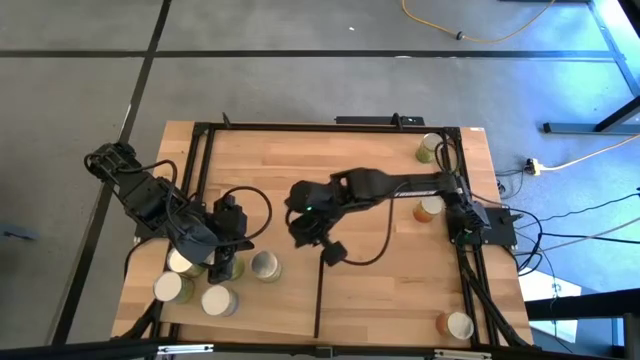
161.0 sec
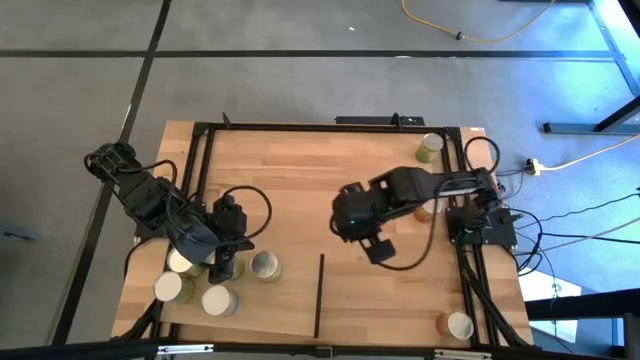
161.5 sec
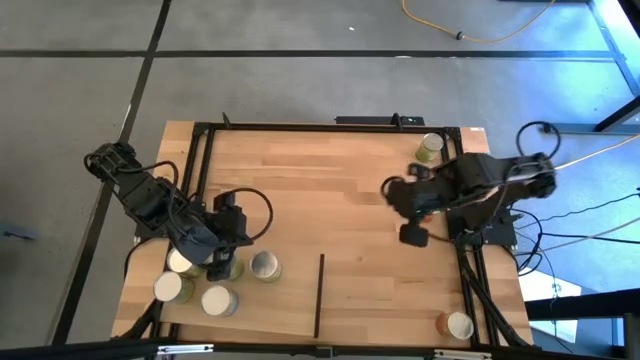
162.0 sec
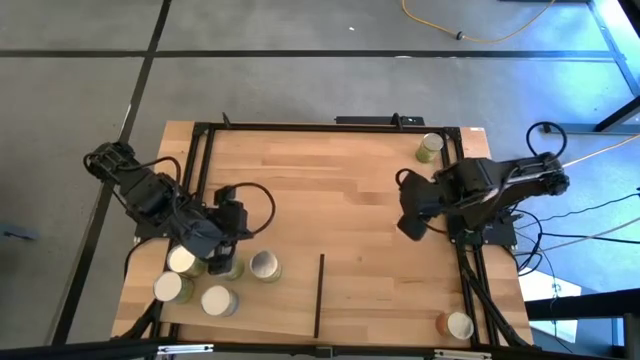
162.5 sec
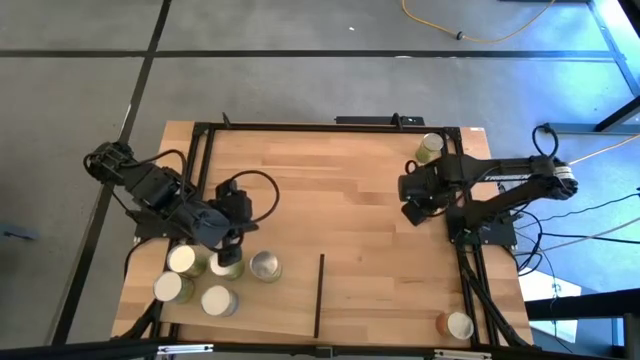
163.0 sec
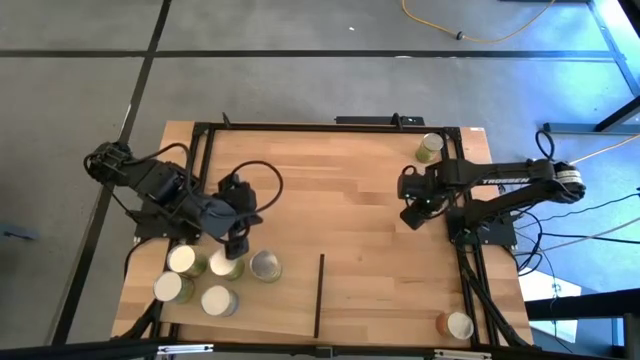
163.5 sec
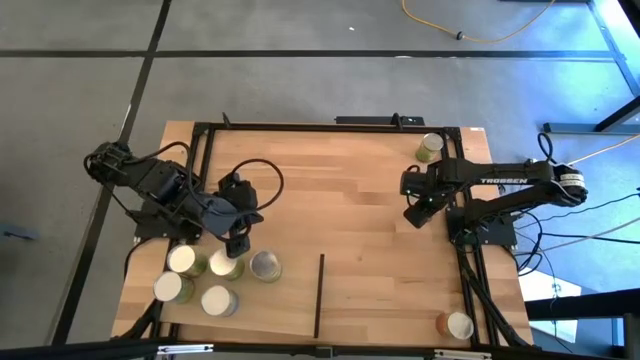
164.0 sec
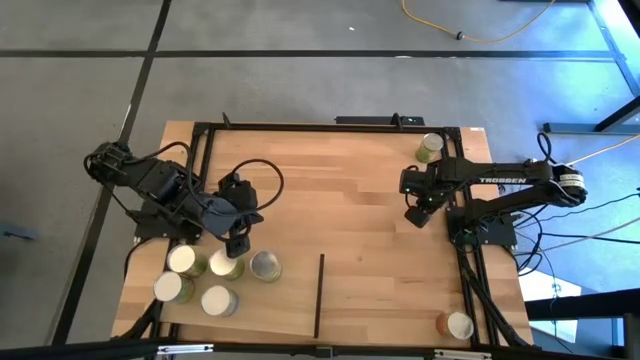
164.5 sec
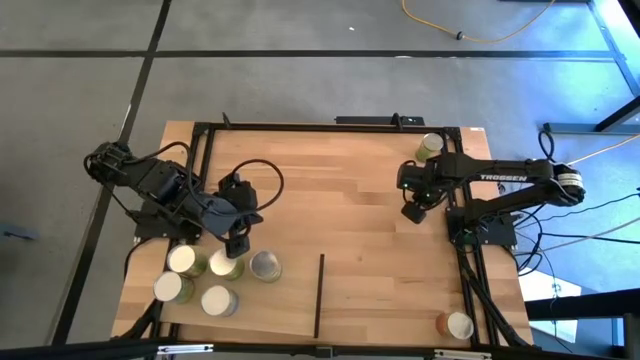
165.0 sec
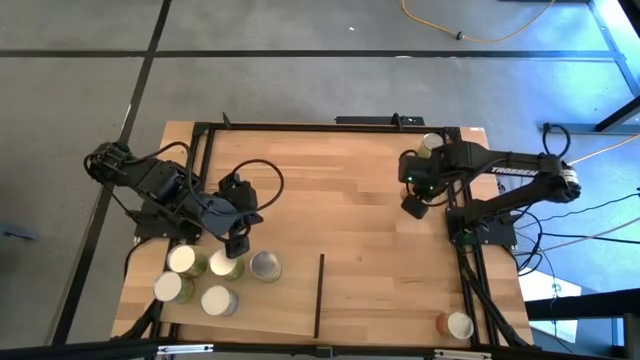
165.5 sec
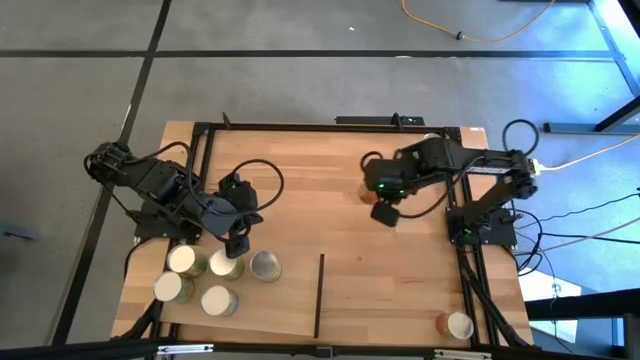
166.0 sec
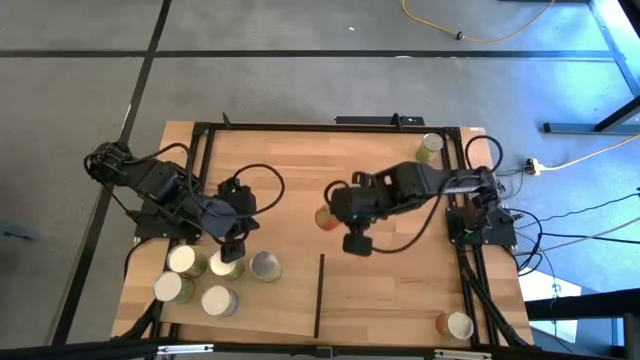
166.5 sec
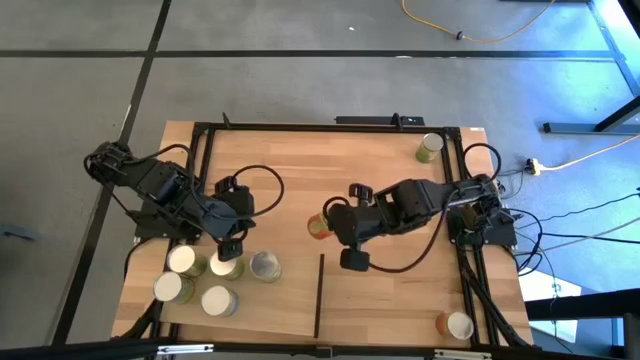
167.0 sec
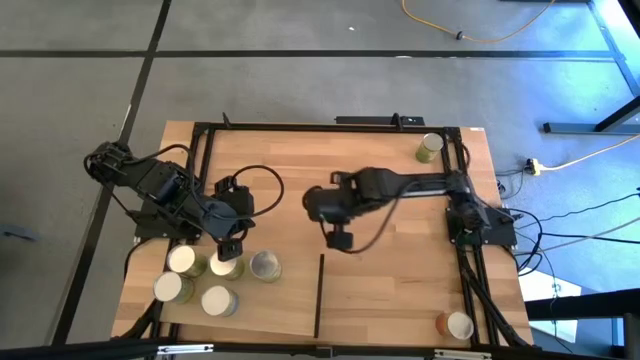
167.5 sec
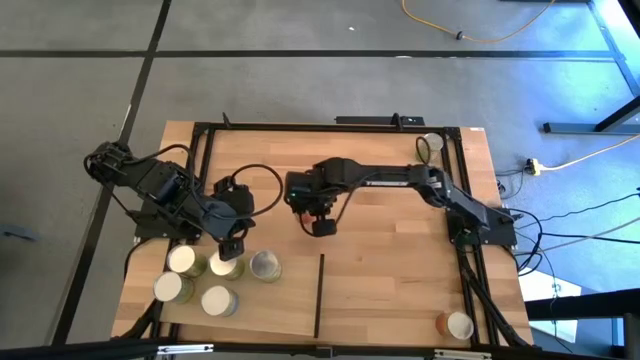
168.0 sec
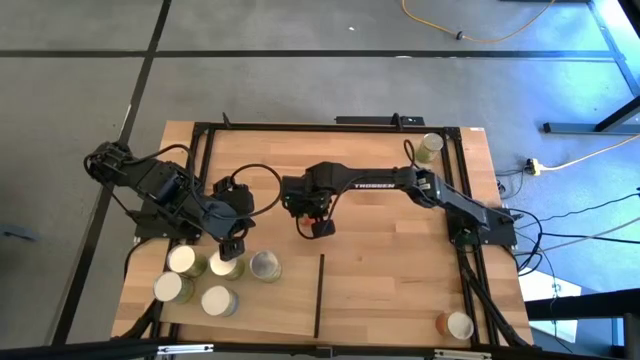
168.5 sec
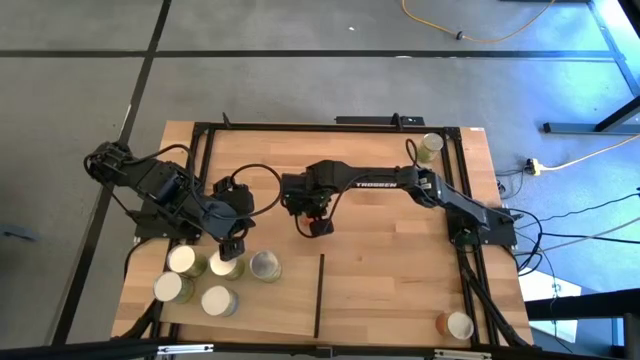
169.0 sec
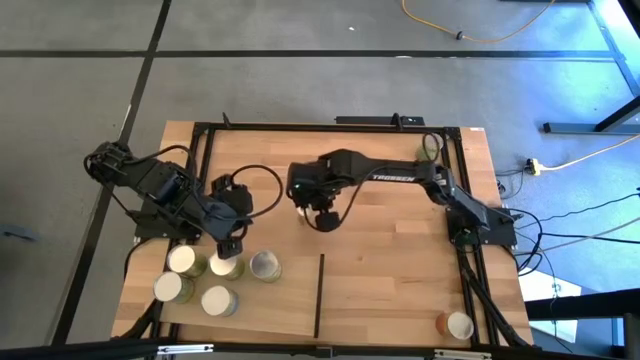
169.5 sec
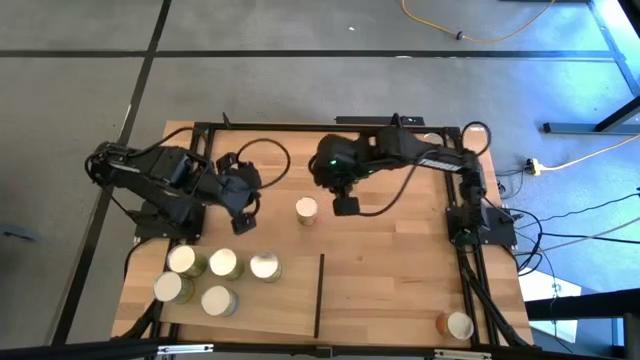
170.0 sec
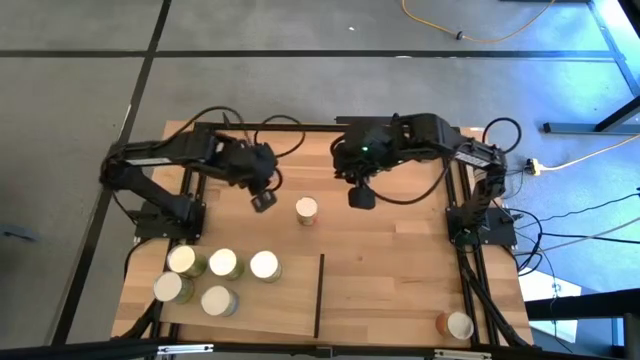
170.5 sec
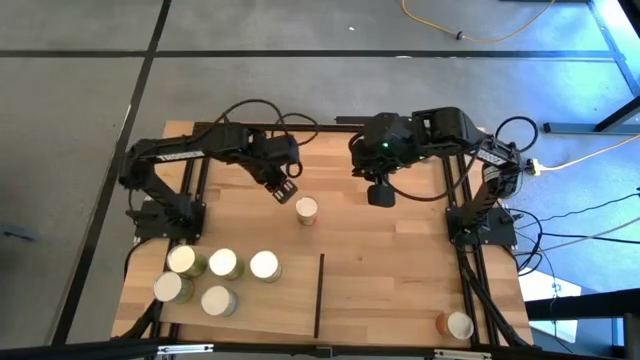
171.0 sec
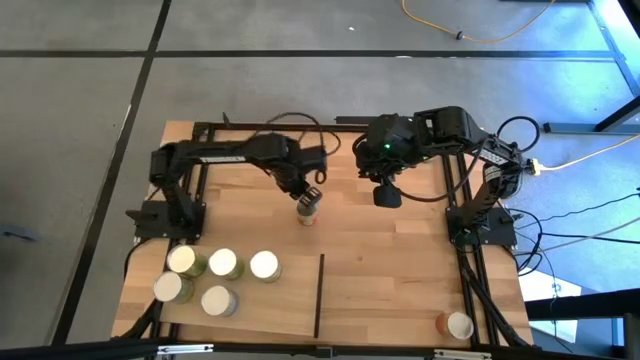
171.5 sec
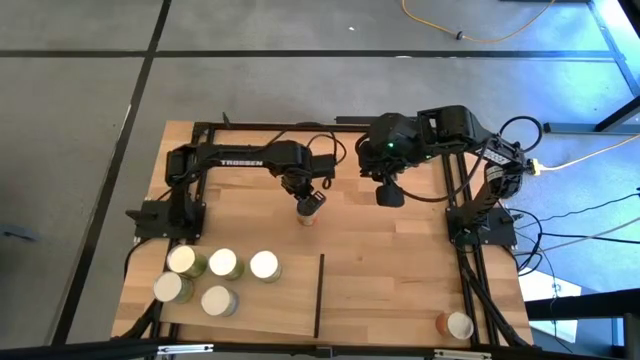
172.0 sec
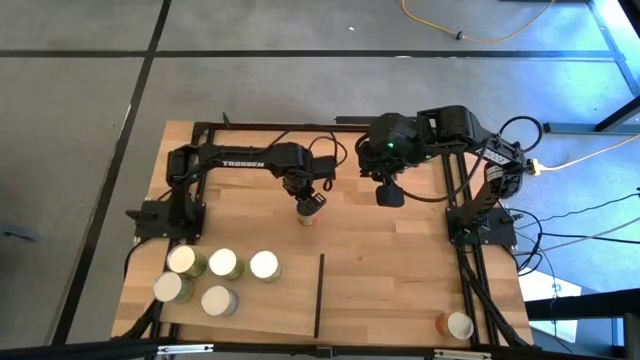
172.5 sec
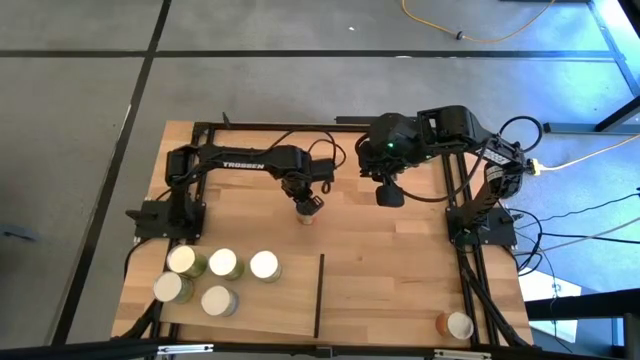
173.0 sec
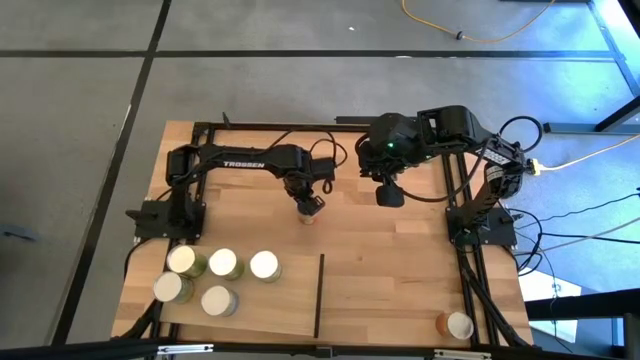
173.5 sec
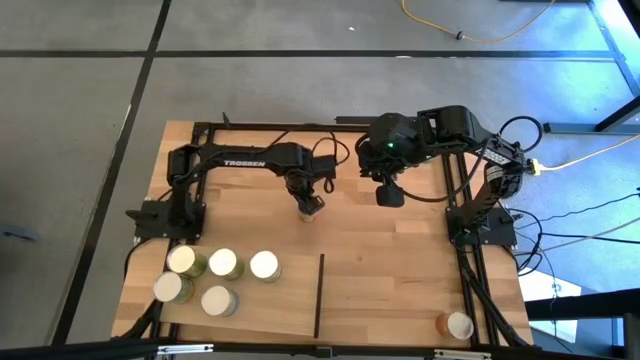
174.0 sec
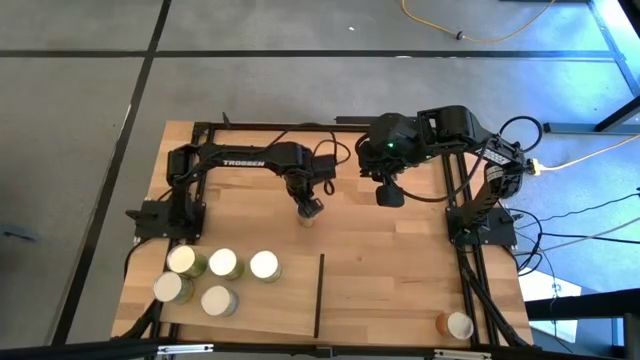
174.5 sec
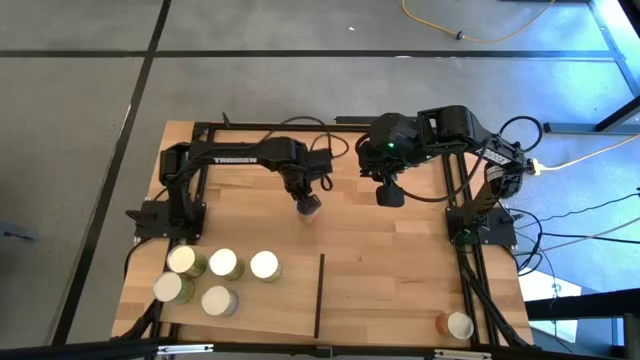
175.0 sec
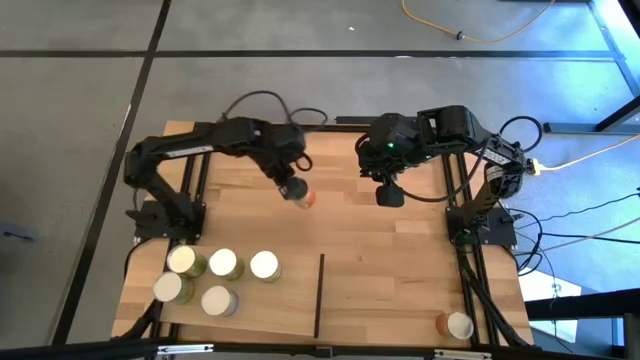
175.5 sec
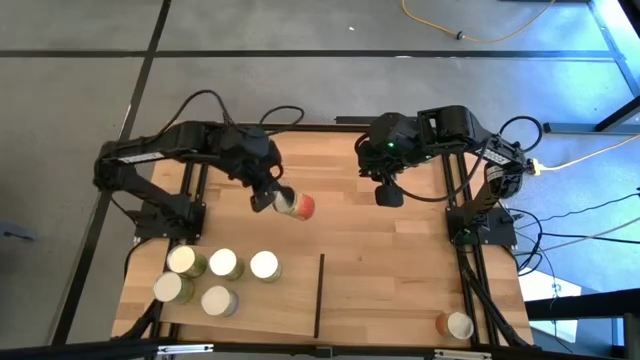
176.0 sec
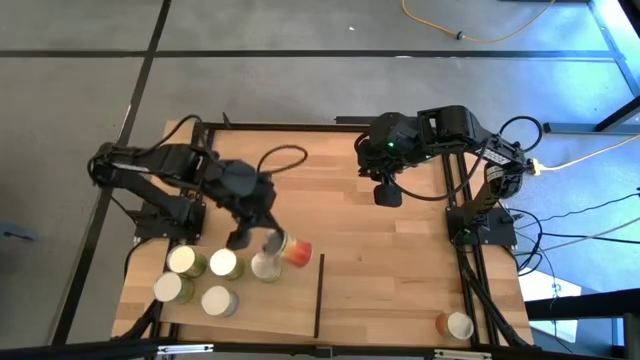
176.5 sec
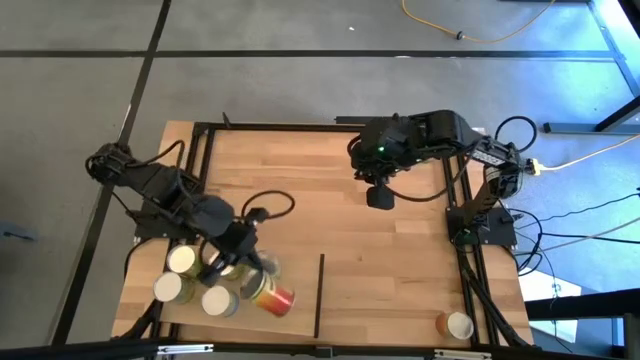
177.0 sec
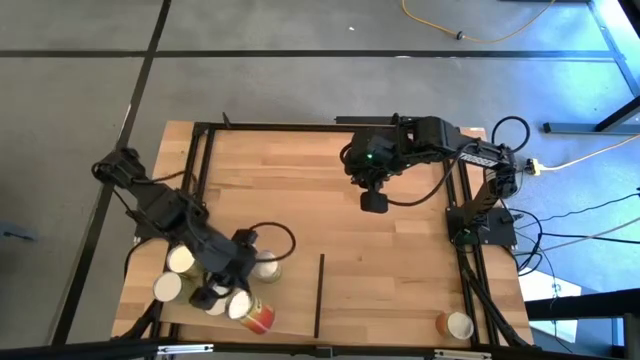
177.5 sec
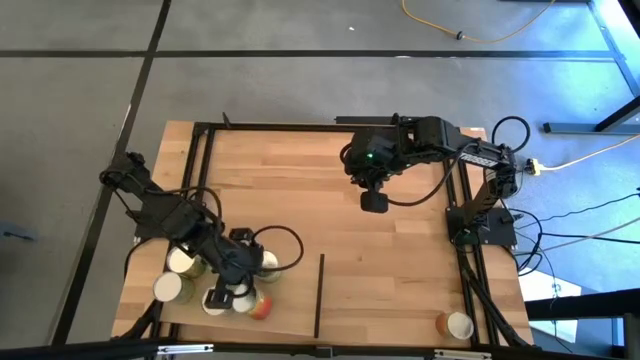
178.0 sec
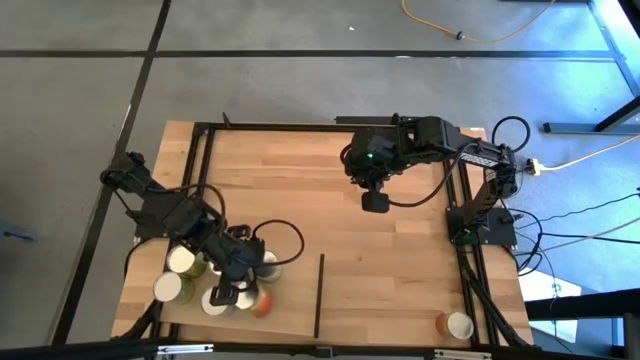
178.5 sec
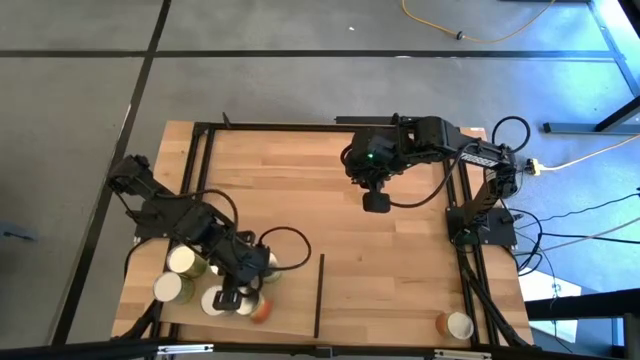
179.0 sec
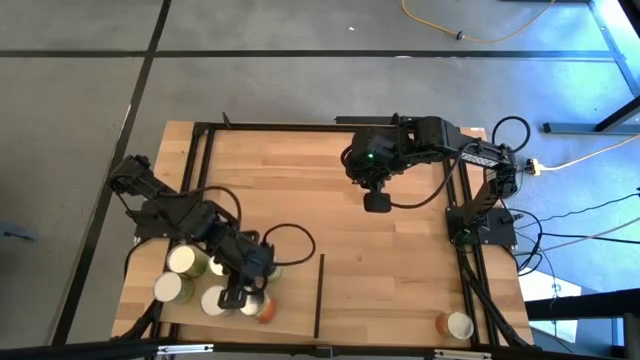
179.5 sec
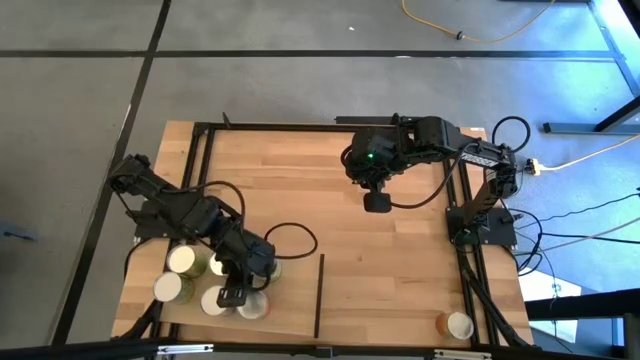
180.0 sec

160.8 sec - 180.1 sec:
Task: Pick and place cans onto a shelf
Put the top canned pineapple on the shelf

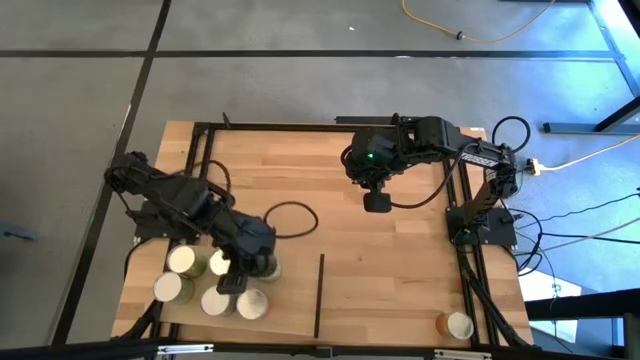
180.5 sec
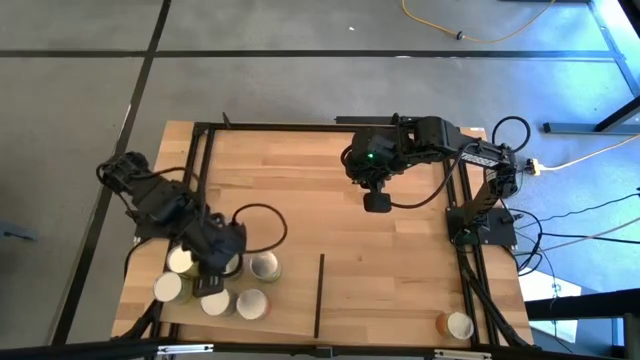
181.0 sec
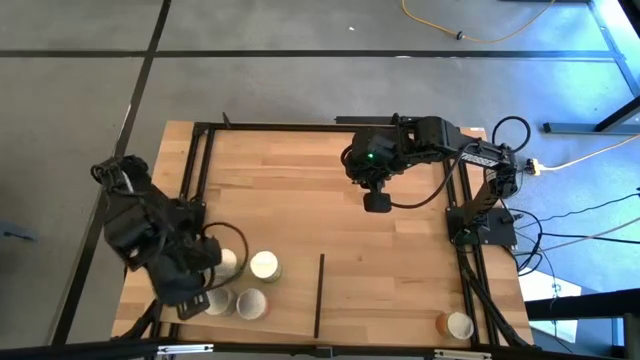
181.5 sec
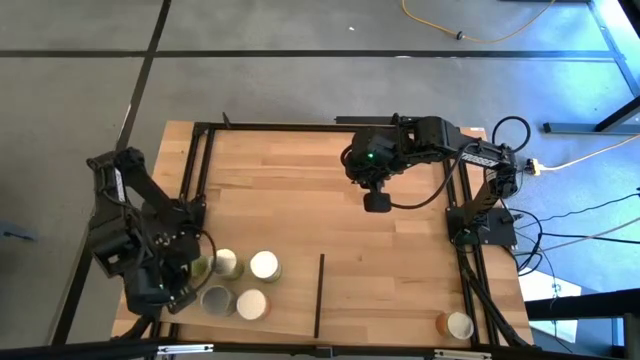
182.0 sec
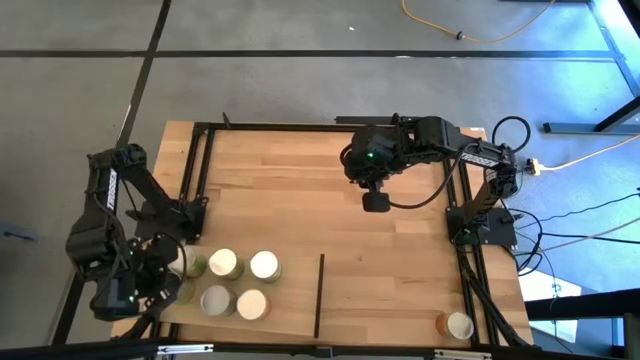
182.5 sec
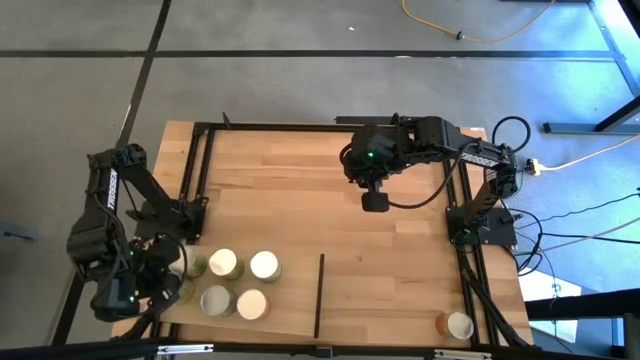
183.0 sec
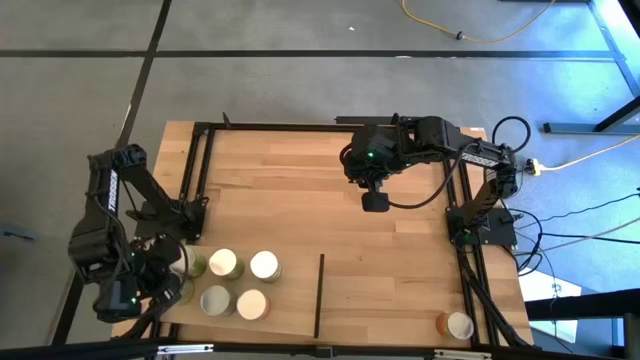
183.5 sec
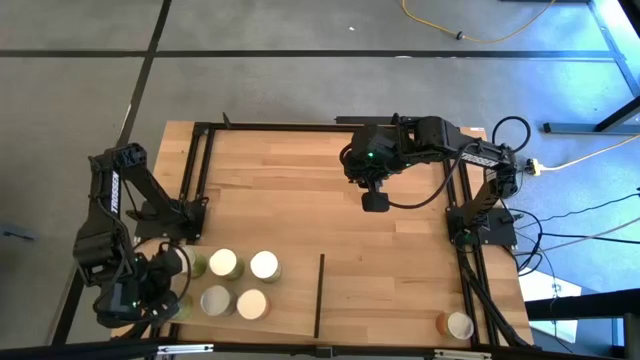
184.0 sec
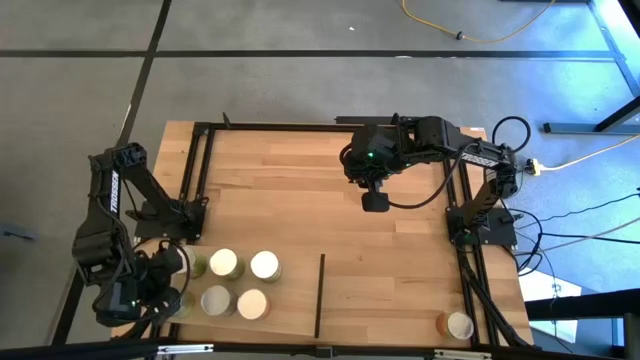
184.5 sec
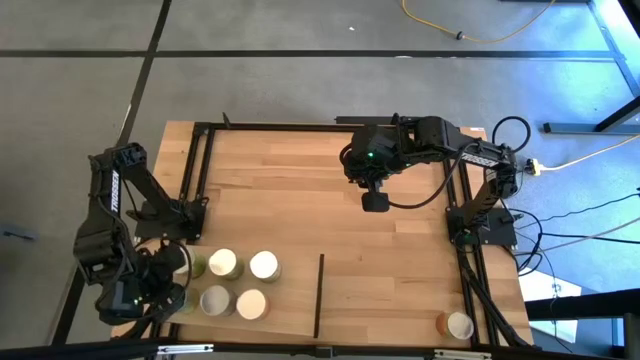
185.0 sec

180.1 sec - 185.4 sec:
Adjust the canned carrots on the shelf
